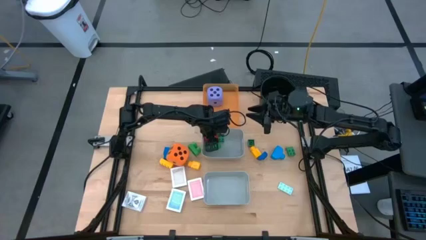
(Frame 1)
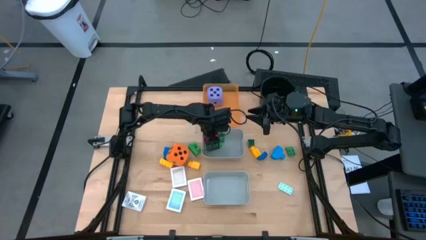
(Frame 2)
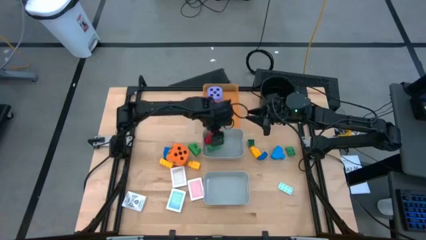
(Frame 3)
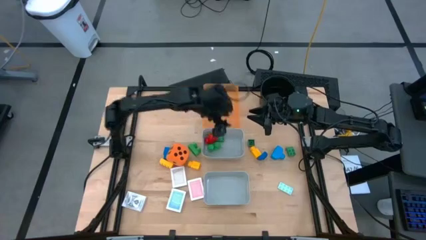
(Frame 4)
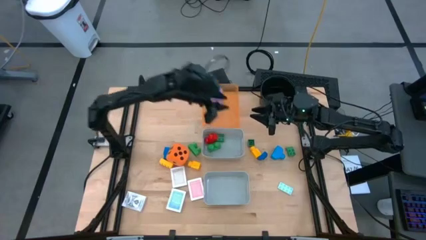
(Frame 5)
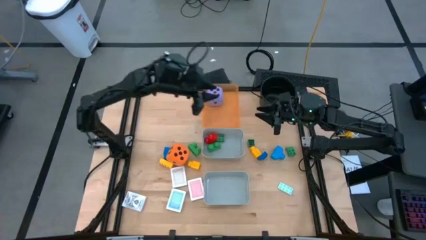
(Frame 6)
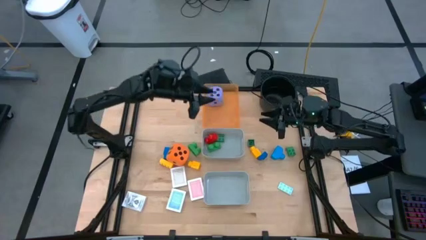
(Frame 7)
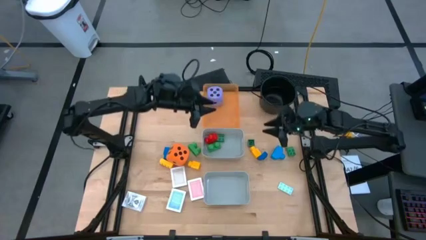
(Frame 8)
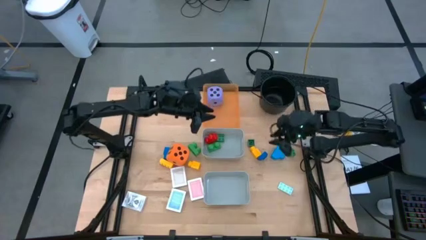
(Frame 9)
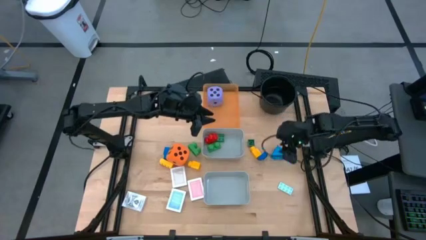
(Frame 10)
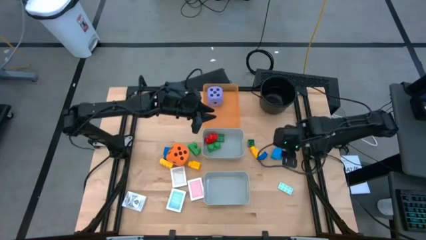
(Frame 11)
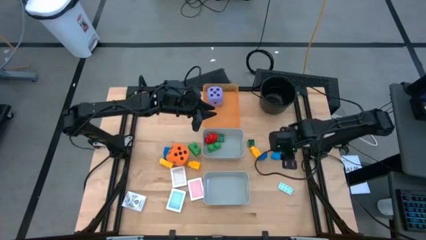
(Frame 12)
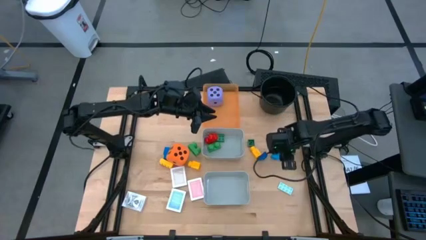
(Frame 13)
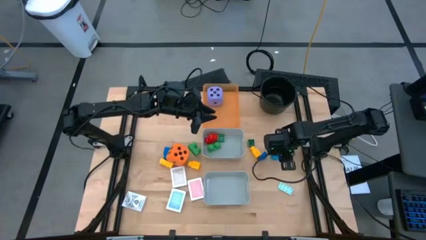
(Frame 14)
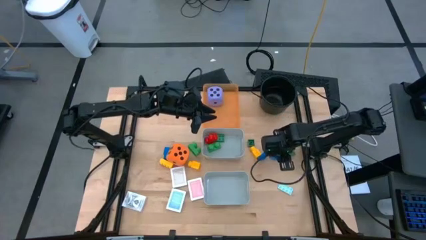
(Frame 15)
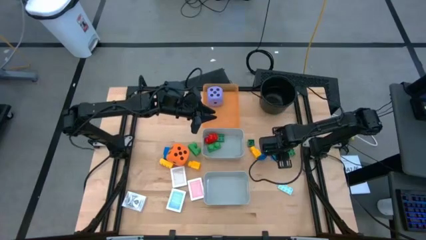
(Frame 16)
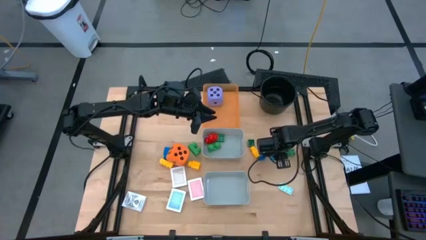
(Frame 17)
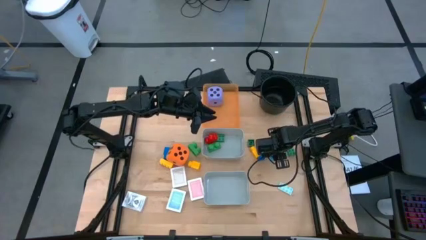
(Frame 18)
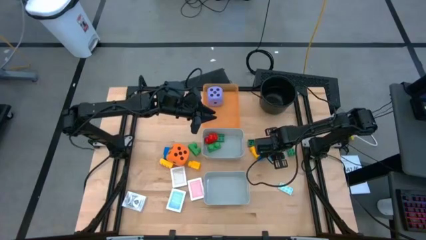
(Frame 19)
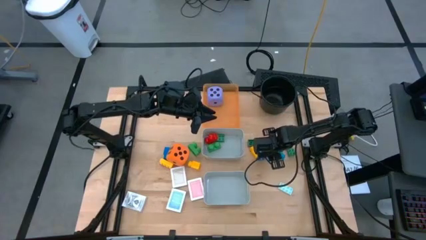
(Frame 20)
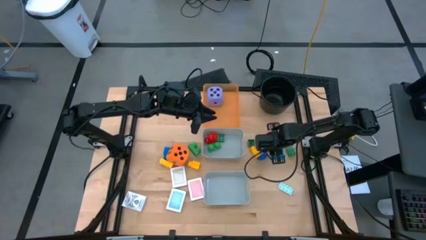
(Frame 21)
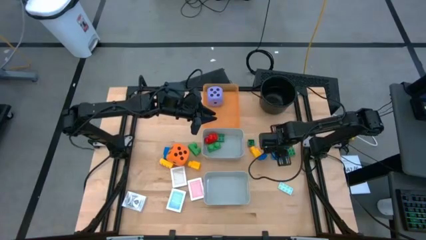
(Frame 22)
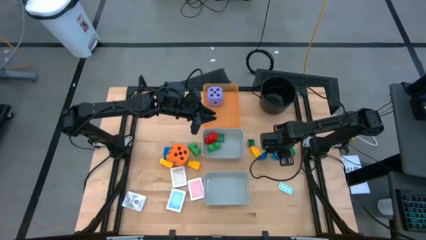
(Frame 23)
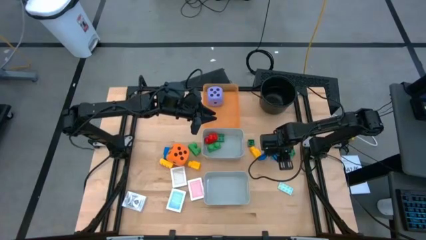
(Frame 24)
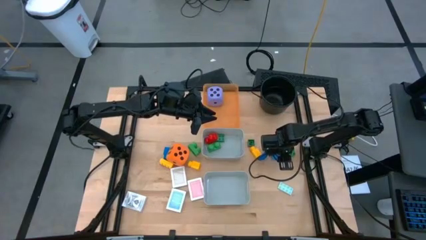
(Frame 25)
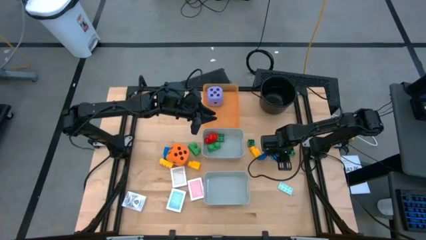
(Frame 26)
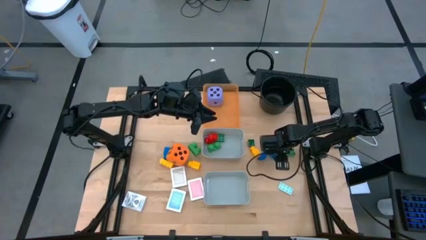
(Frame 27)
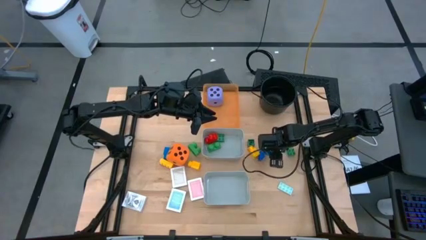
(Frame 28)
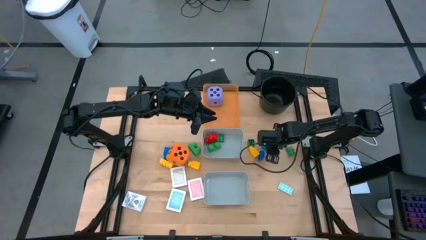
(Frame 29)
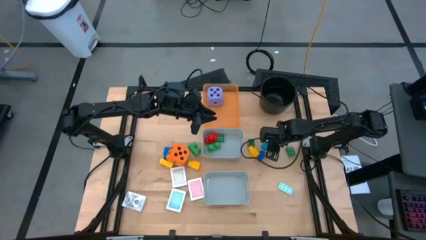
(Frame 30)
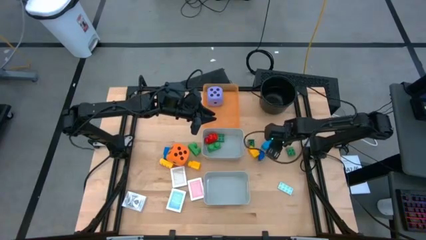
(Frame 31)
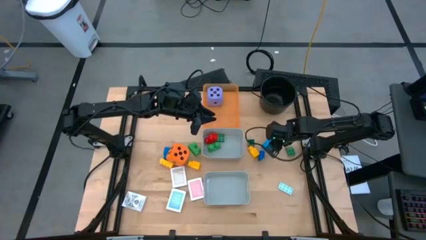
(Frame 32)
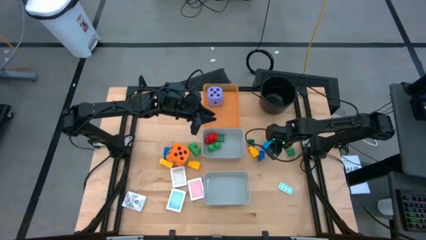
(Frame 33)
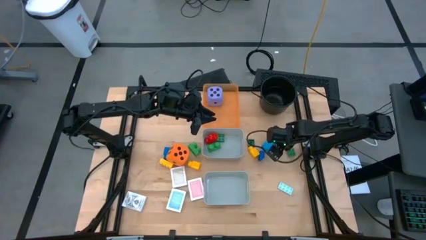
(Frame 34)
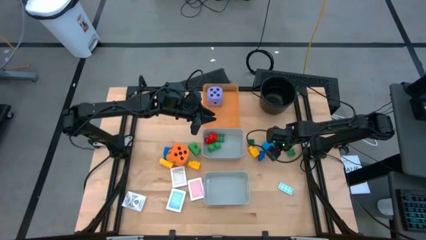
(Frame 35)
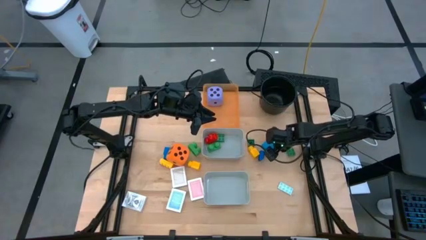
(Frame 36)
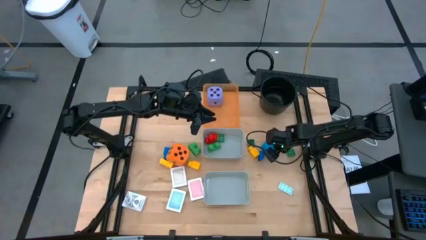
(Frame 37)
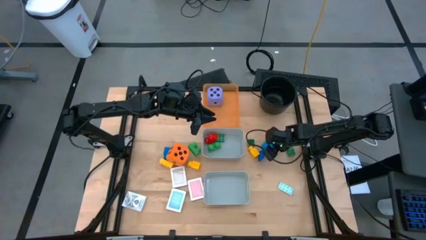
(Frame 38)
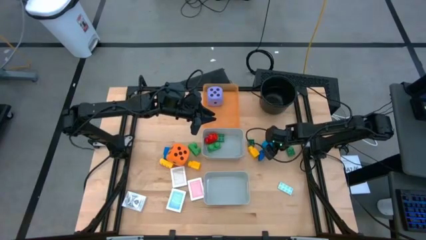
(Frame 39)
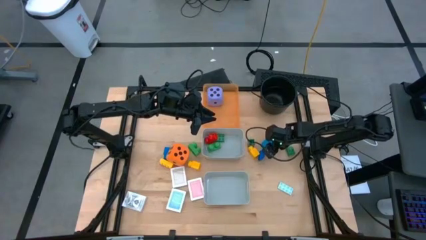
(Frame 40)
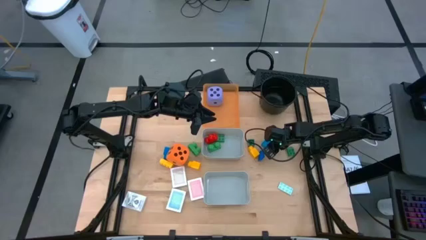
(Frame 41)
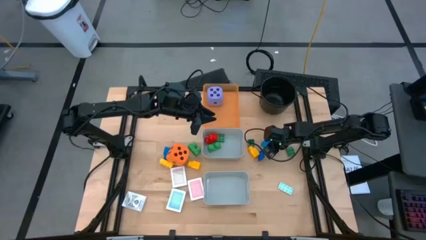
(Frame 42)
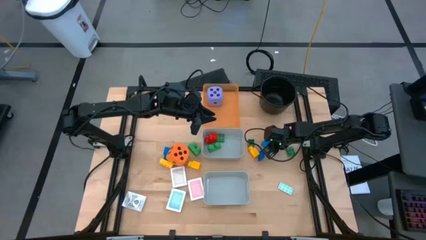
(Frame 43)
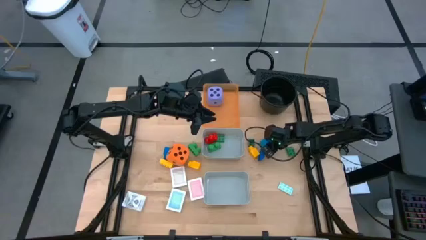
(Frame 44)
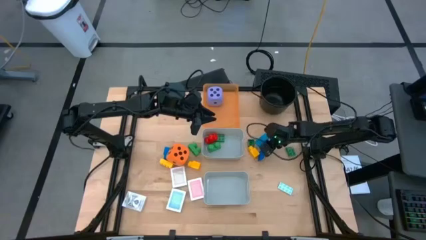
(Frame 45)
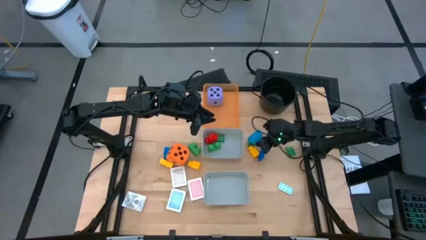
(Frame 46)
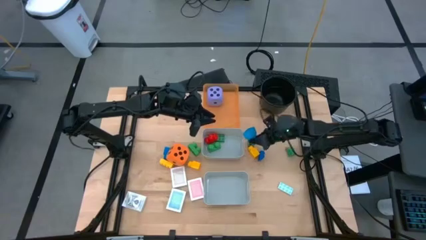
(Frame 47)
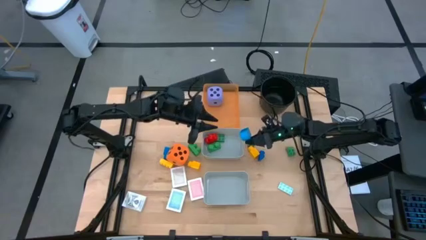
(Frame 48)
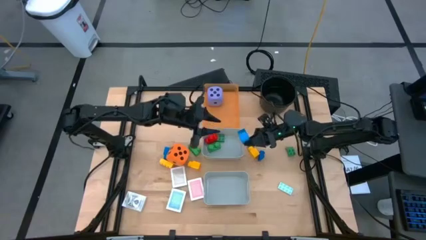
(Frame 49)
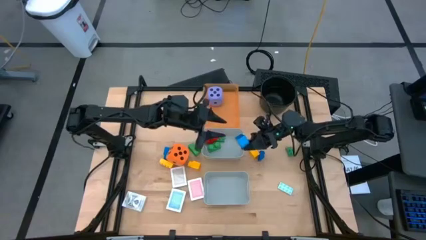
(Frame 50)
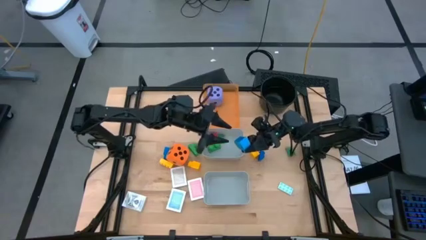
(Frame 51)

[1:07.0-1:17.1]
Task: Pick & Place Toys
Put the light blue game piece into the top gray bin

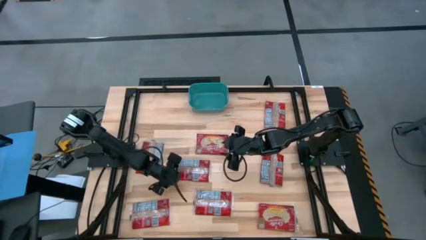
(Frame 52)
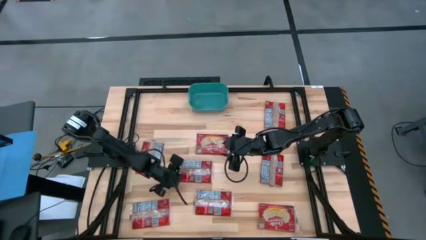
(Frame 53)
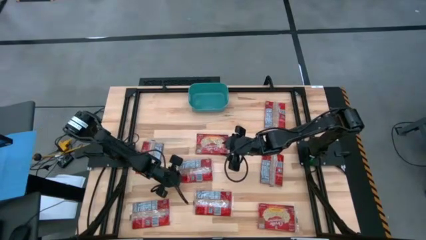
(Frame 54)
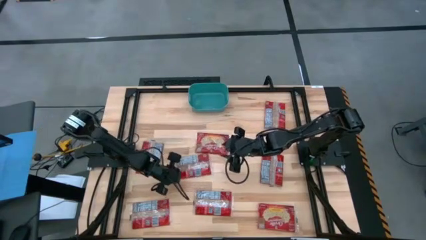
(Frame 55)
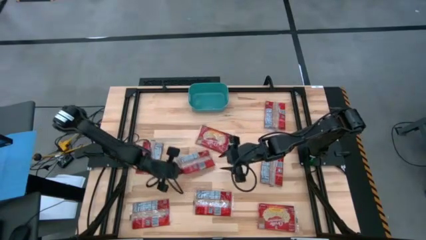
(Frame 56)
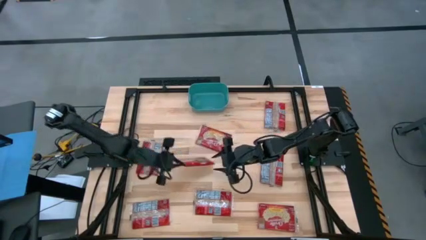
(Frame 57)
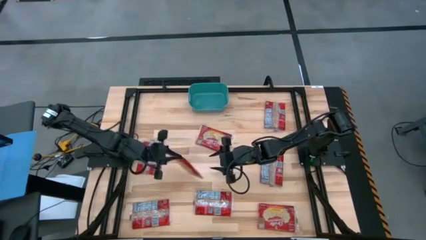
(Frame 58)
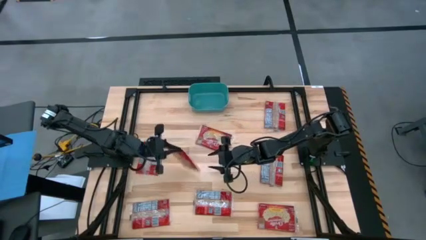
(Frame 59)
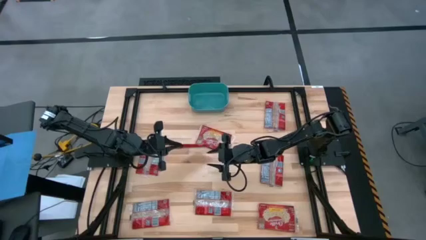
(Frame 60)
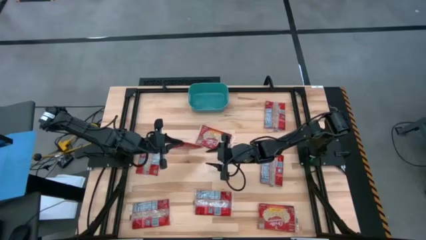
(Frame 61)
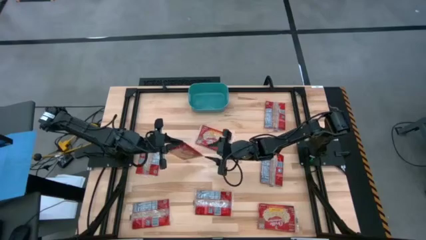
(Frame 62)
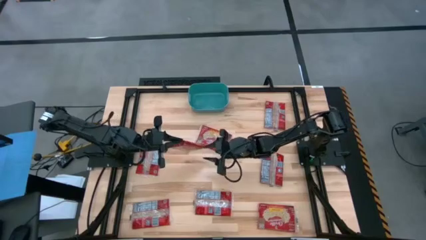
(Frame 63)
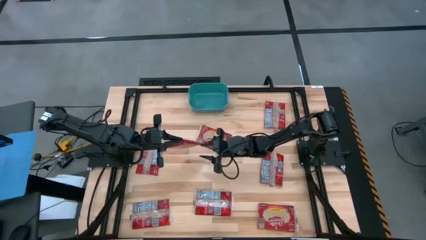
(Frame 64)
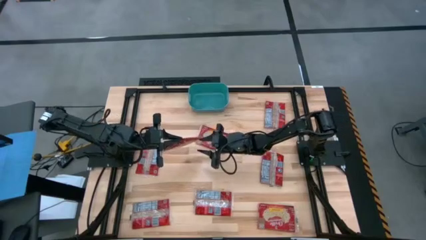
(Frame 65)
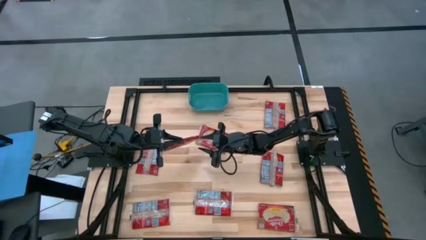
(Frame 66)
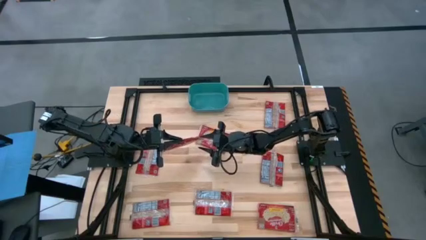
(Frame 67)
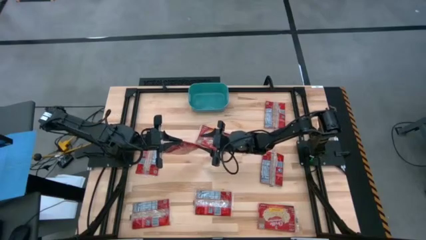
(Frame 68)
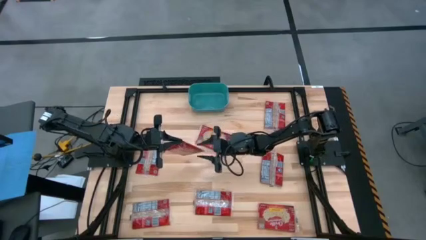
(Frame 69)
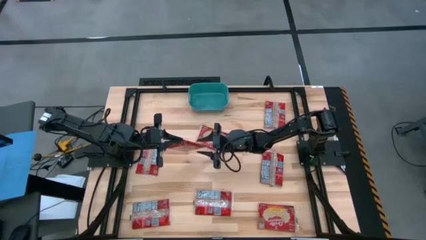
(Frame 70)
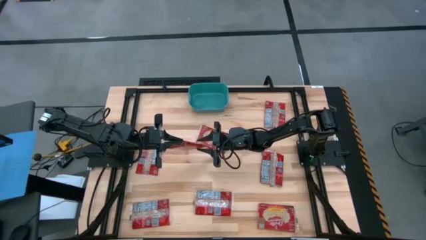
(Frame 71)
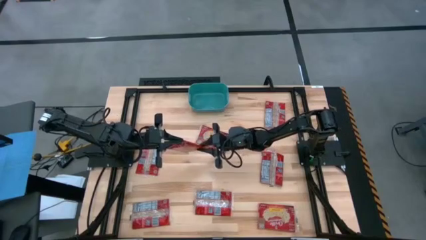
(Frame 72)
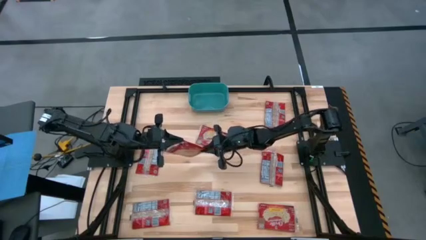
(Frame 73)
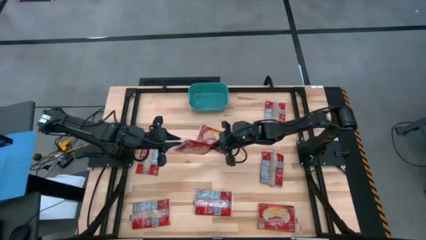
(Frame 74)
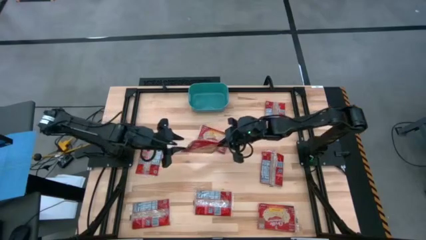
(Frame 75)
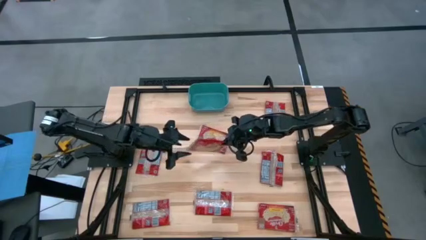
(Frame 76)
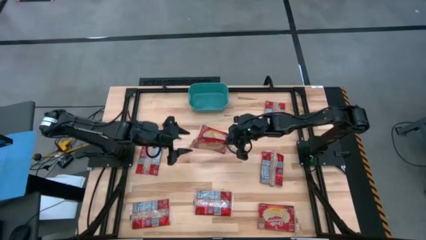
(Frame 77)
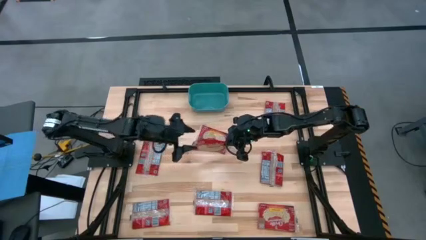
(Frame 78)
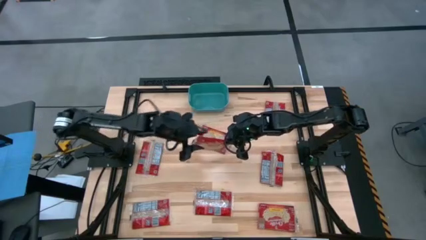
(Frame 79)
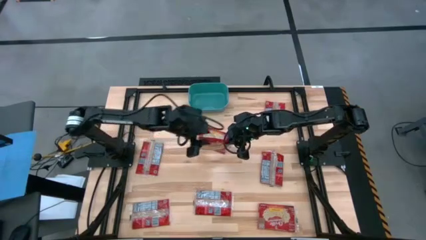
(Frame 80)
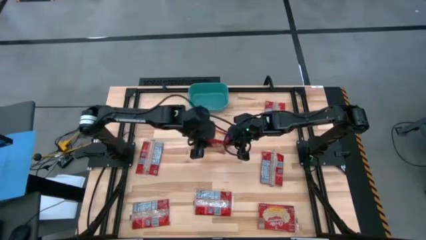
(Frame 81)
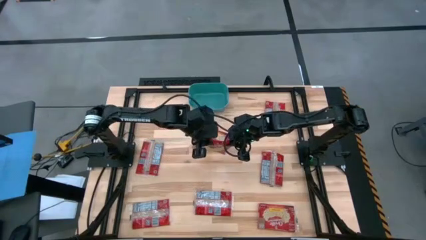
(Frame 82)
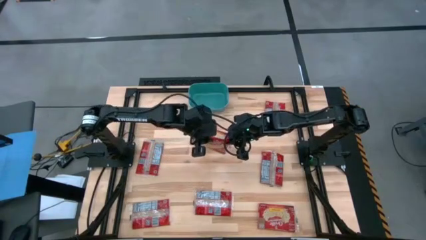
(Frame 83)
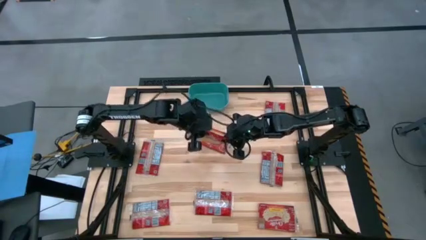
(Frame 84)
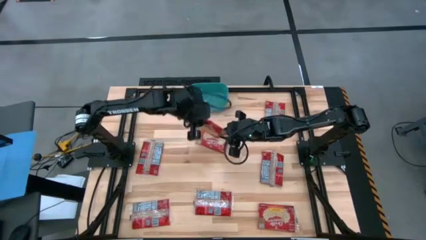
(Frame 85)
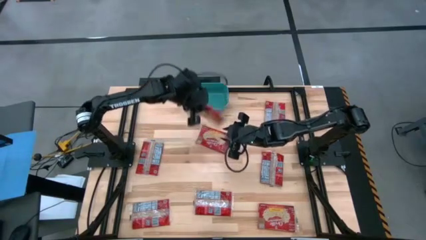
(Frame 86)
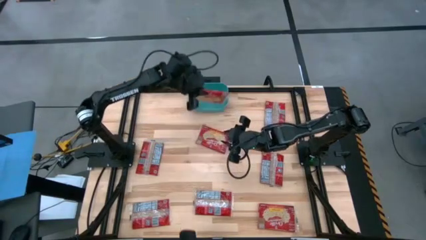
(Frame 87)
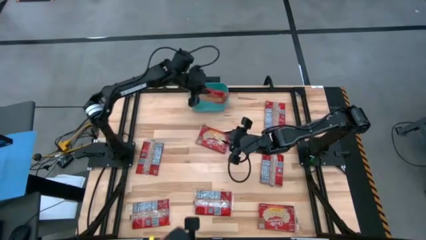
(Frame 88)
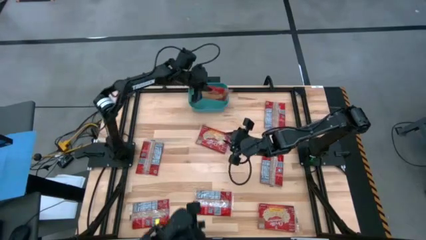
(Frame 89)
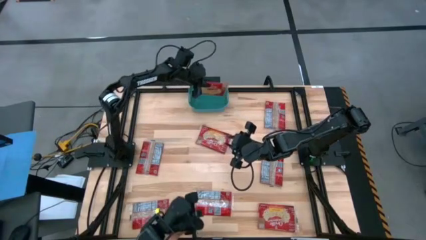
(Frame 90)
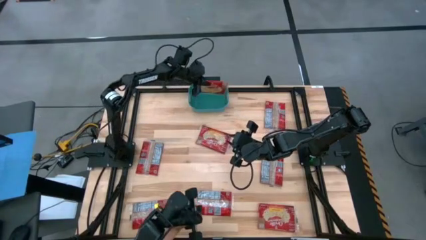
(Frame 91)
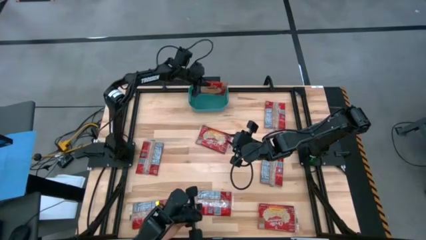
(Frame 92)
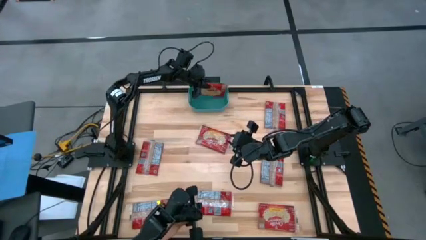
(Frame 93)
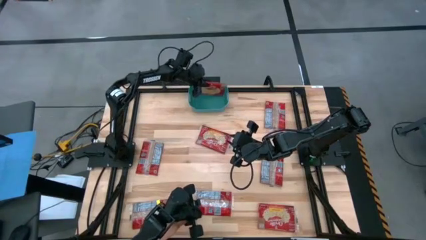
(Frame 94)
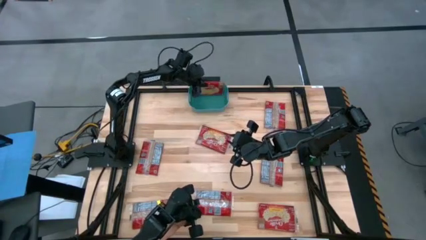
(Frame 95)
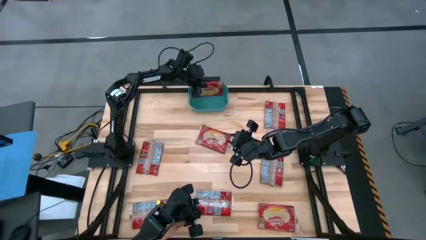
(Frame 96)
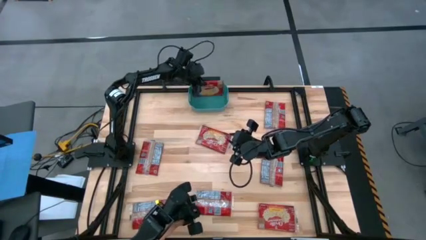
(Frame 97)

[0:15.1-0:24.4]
Task: Sort popcorn bags into baskets
Put the red popcorn bag into the green basket
